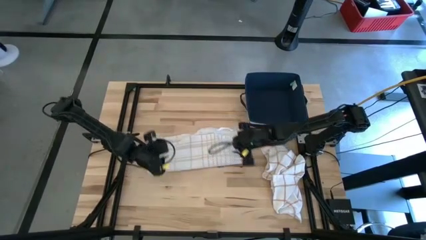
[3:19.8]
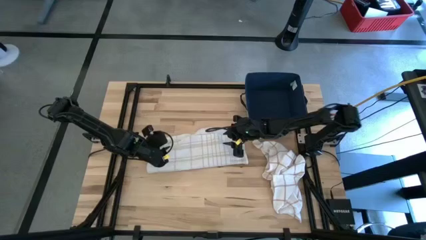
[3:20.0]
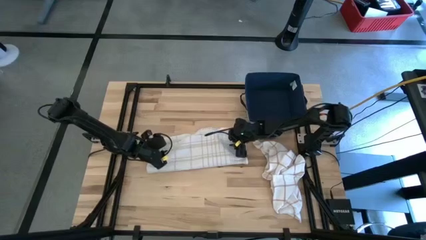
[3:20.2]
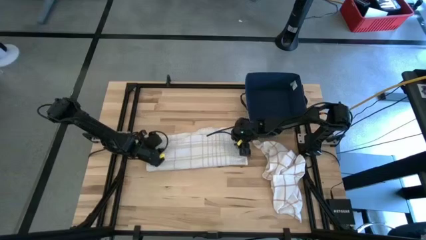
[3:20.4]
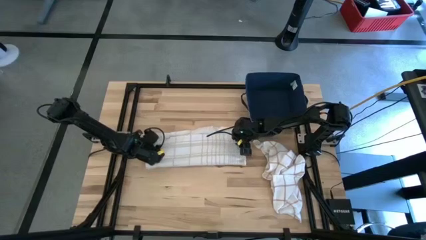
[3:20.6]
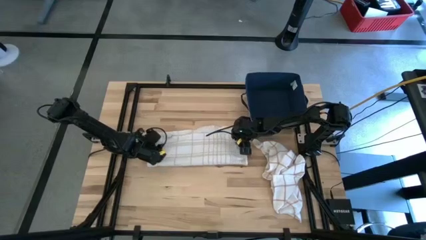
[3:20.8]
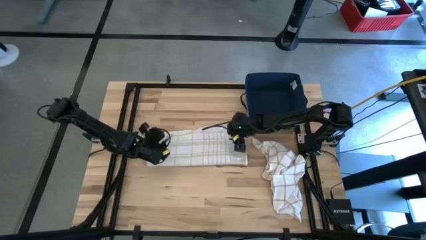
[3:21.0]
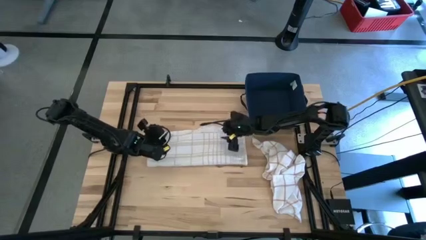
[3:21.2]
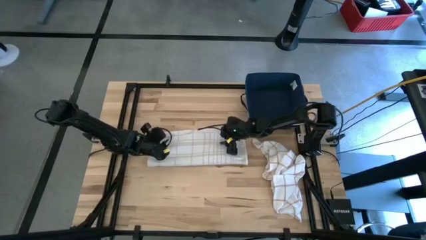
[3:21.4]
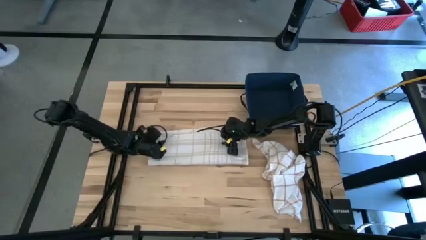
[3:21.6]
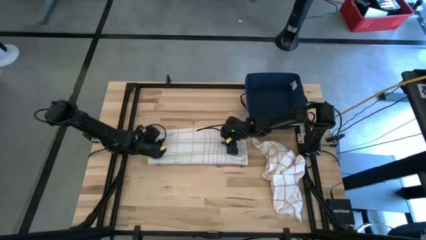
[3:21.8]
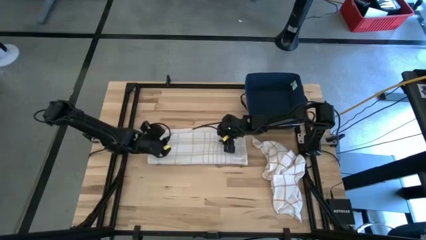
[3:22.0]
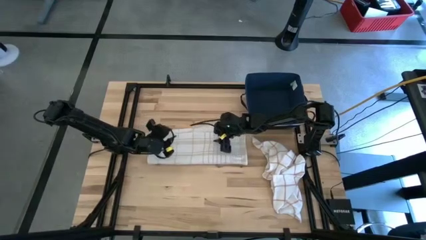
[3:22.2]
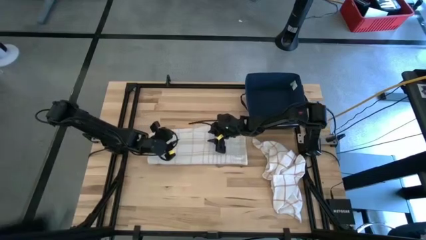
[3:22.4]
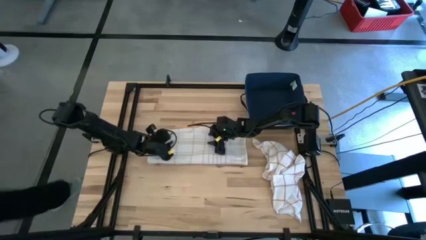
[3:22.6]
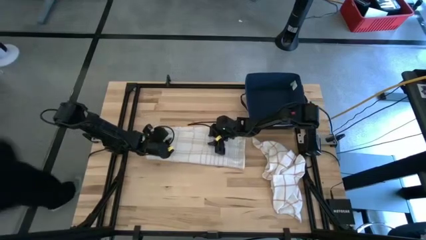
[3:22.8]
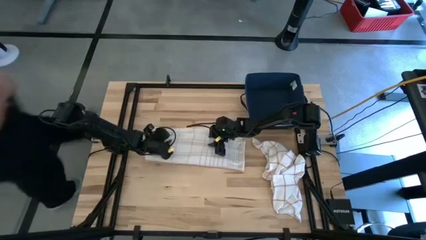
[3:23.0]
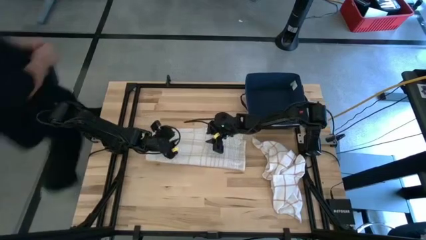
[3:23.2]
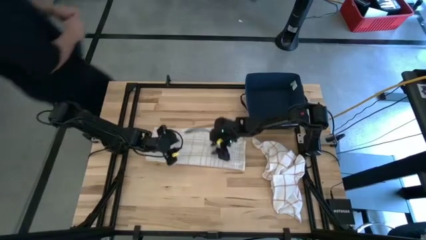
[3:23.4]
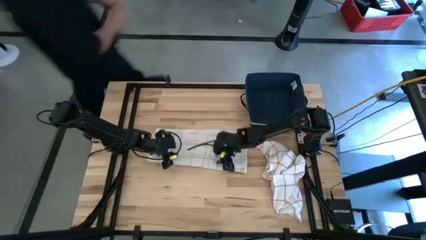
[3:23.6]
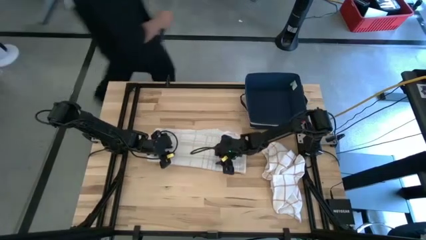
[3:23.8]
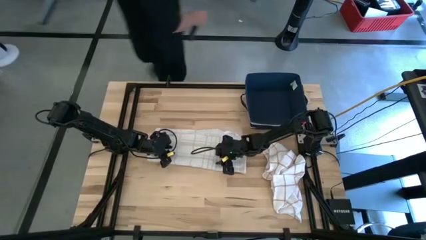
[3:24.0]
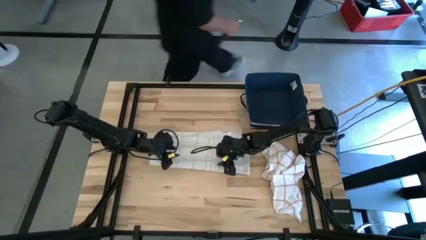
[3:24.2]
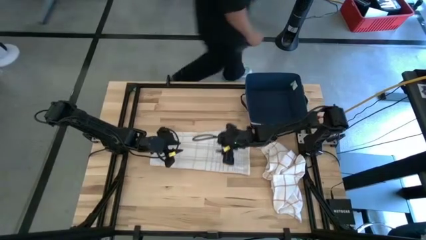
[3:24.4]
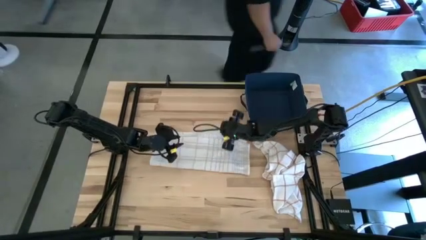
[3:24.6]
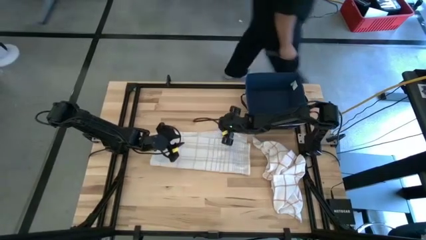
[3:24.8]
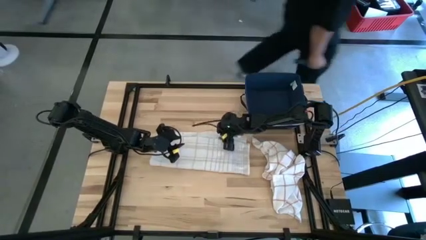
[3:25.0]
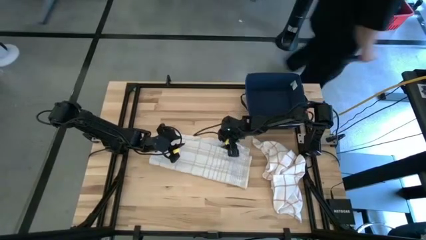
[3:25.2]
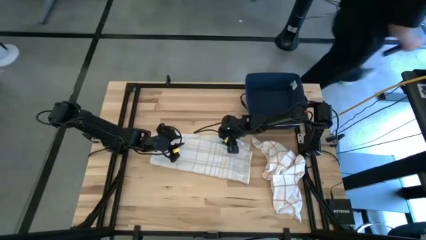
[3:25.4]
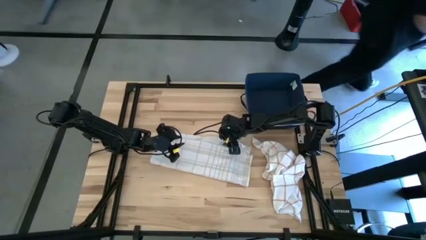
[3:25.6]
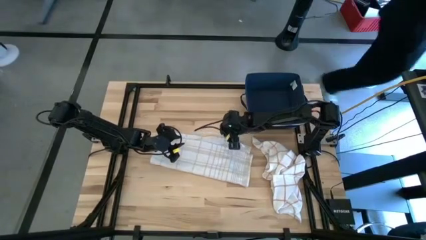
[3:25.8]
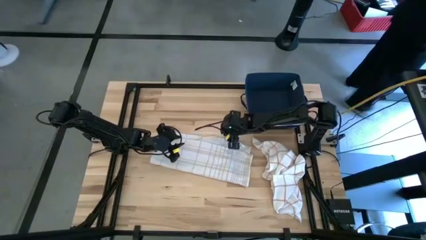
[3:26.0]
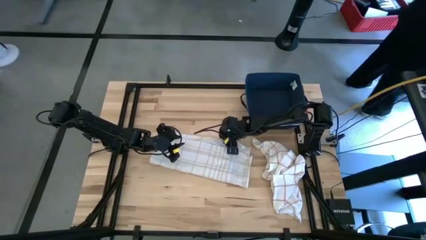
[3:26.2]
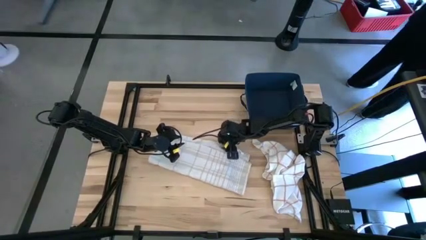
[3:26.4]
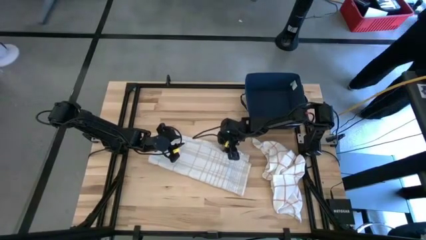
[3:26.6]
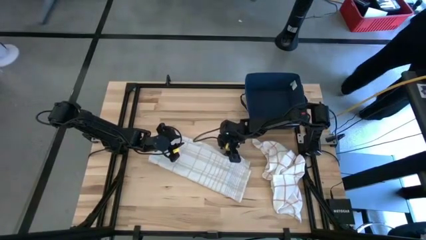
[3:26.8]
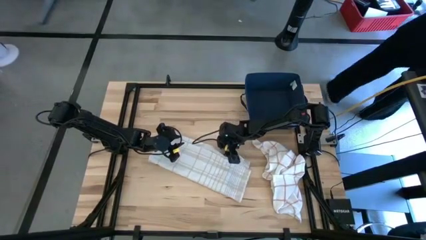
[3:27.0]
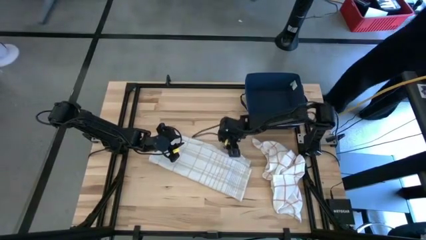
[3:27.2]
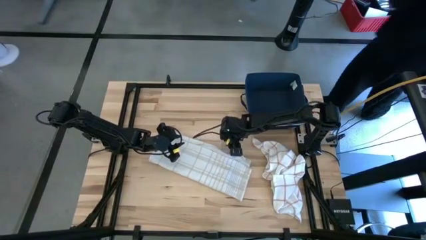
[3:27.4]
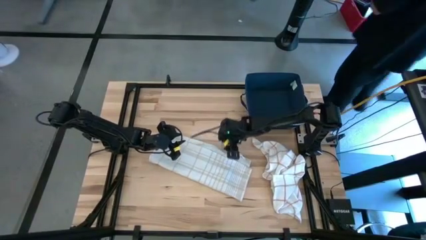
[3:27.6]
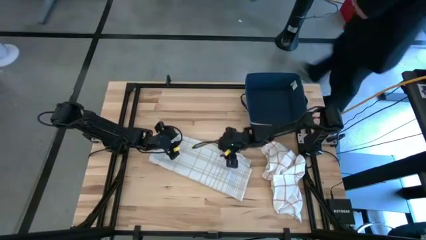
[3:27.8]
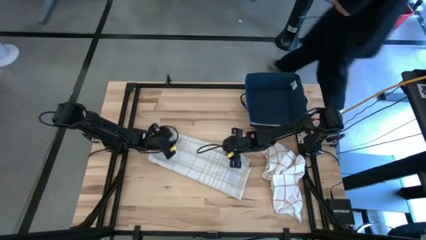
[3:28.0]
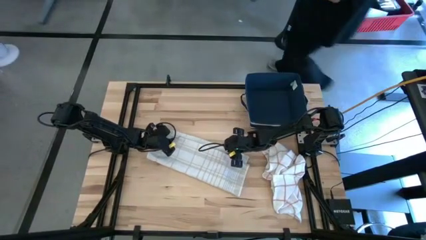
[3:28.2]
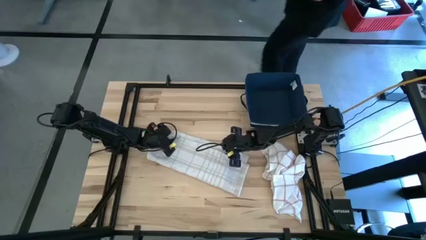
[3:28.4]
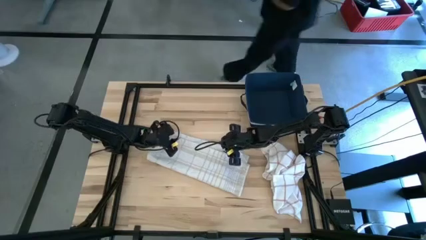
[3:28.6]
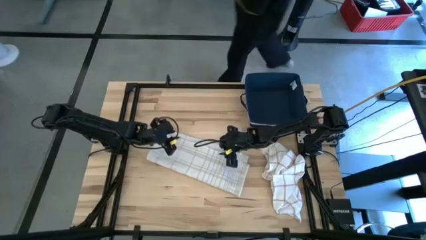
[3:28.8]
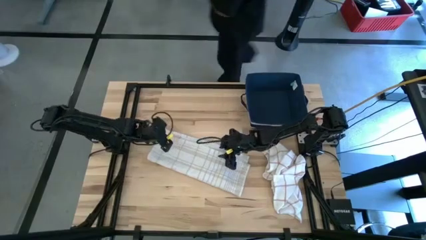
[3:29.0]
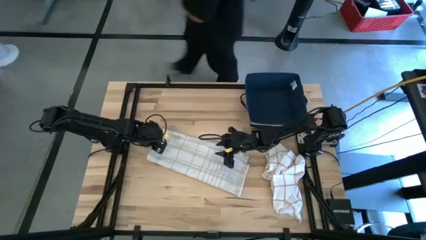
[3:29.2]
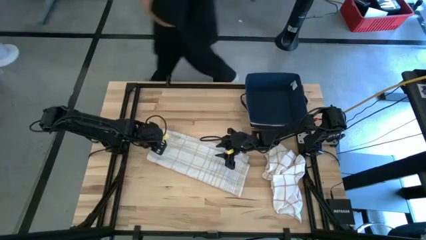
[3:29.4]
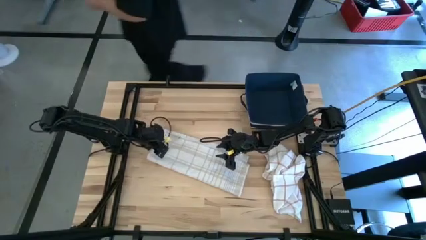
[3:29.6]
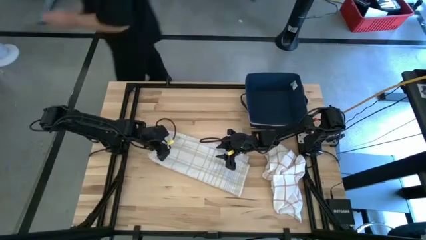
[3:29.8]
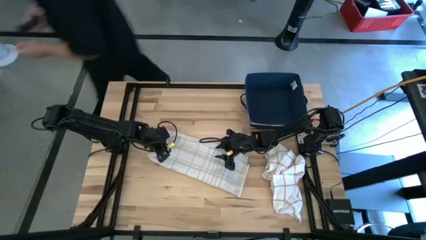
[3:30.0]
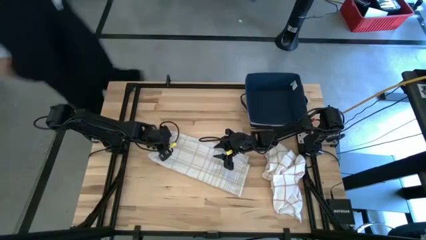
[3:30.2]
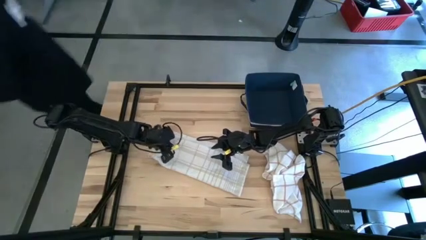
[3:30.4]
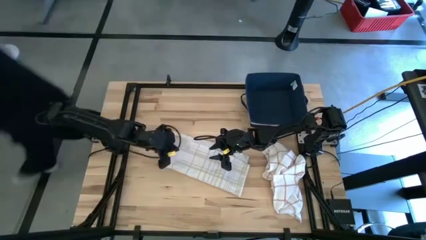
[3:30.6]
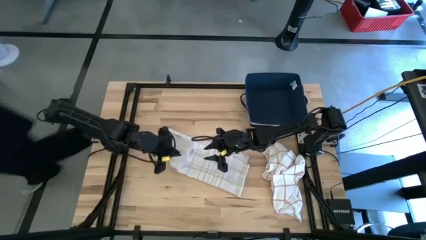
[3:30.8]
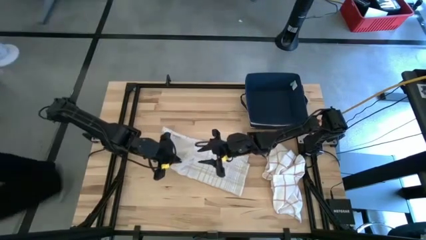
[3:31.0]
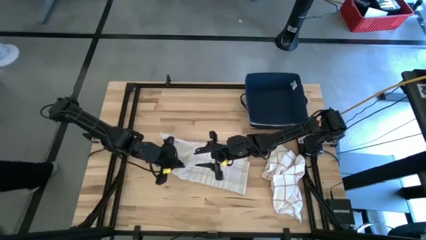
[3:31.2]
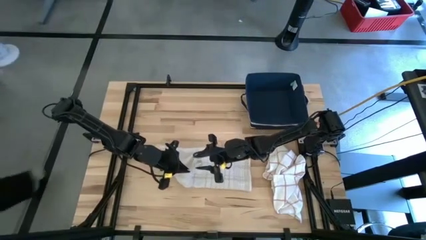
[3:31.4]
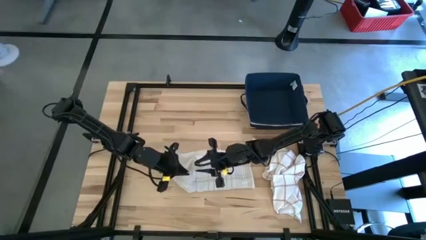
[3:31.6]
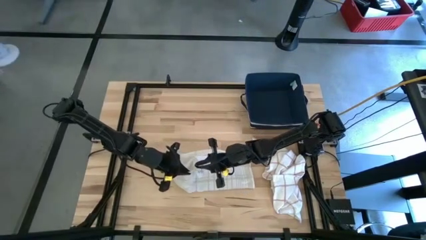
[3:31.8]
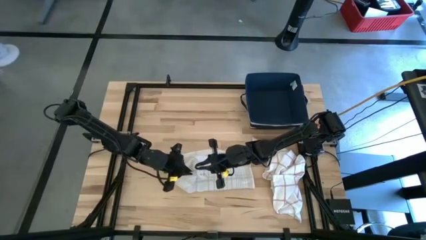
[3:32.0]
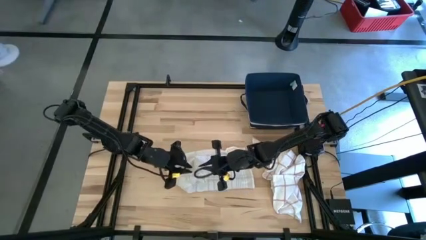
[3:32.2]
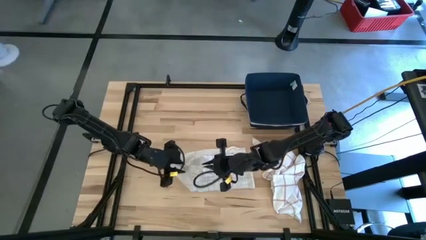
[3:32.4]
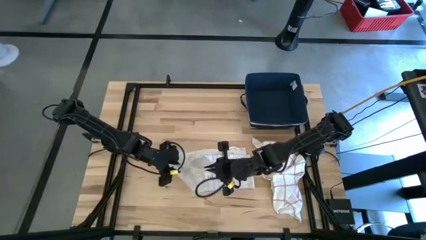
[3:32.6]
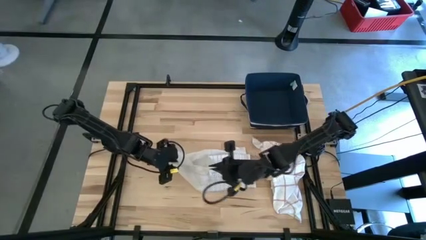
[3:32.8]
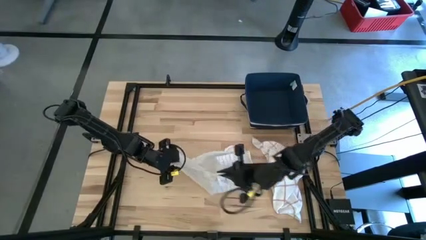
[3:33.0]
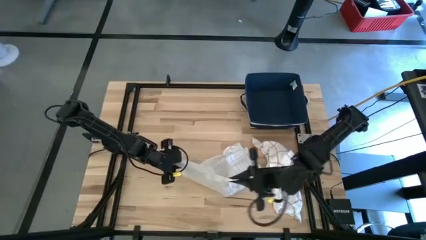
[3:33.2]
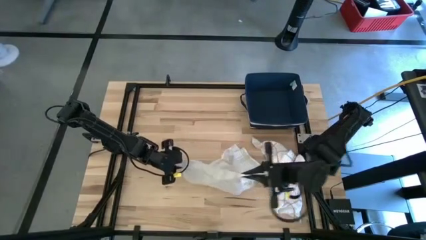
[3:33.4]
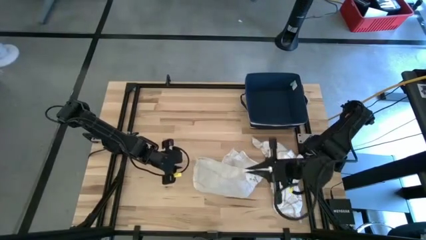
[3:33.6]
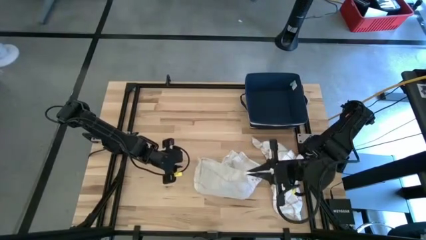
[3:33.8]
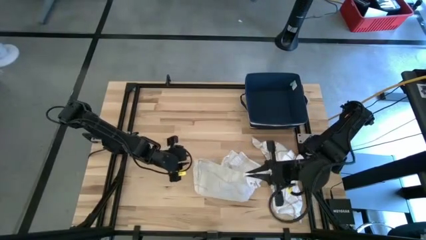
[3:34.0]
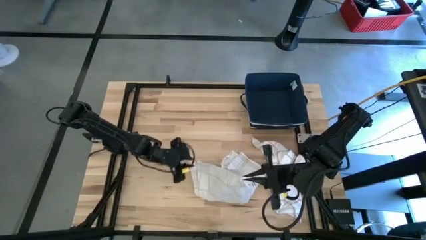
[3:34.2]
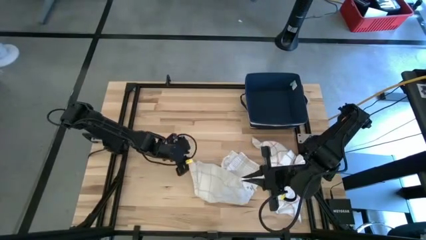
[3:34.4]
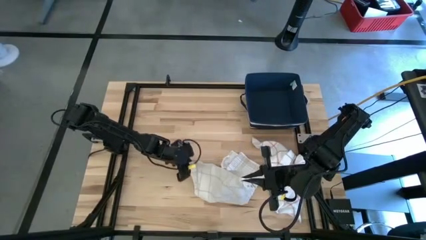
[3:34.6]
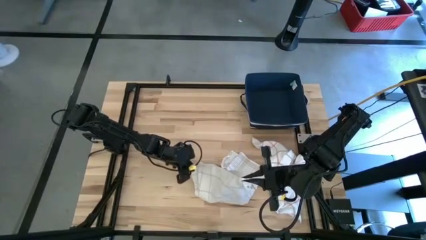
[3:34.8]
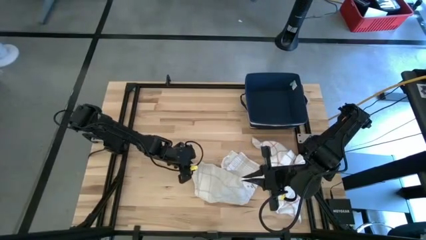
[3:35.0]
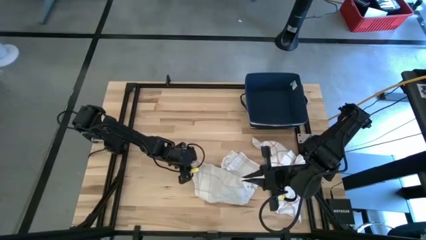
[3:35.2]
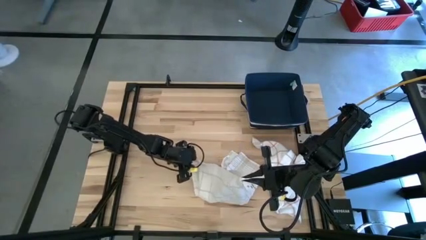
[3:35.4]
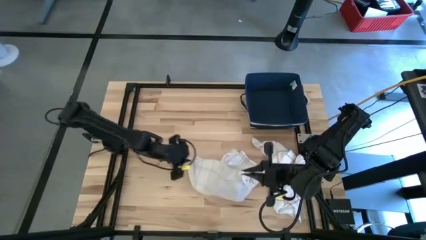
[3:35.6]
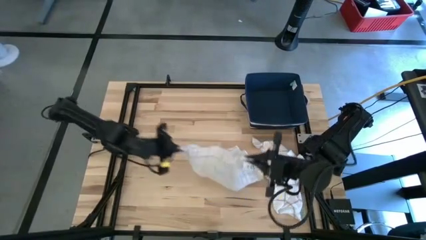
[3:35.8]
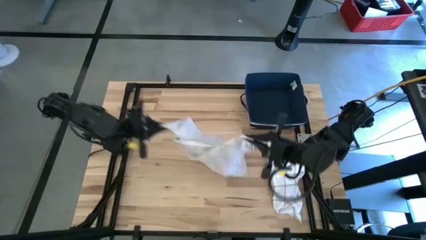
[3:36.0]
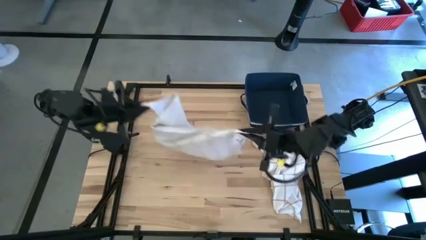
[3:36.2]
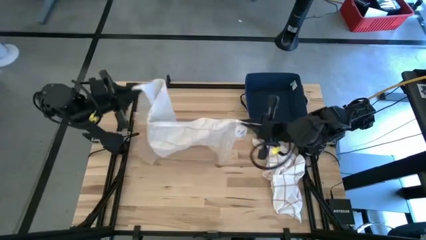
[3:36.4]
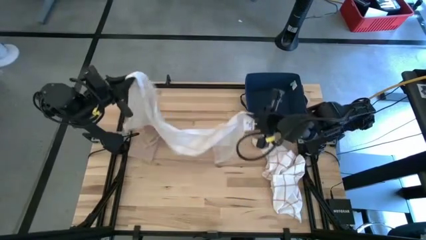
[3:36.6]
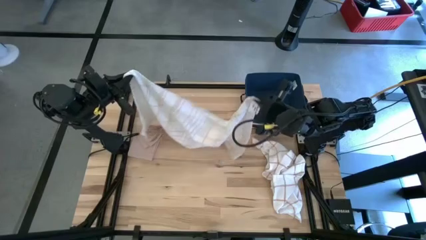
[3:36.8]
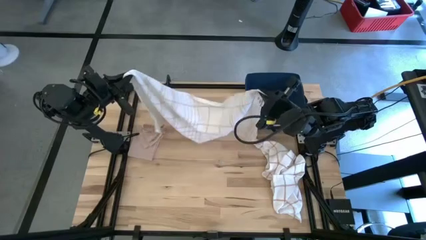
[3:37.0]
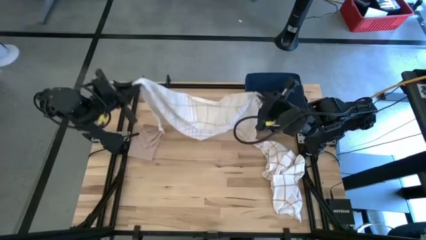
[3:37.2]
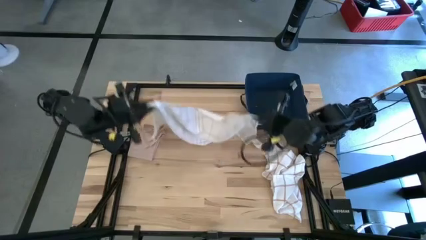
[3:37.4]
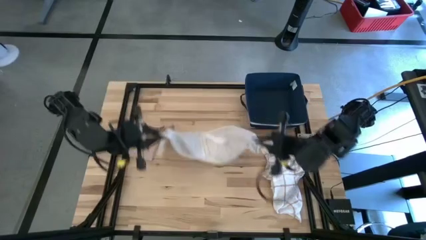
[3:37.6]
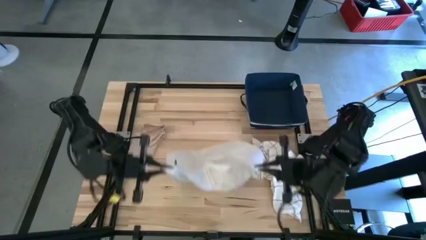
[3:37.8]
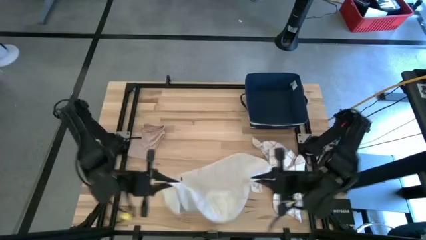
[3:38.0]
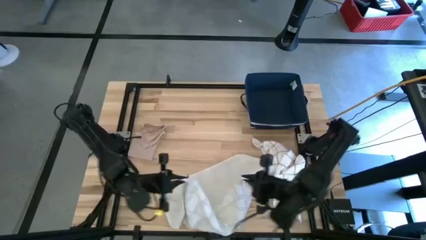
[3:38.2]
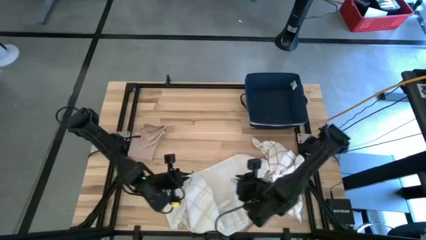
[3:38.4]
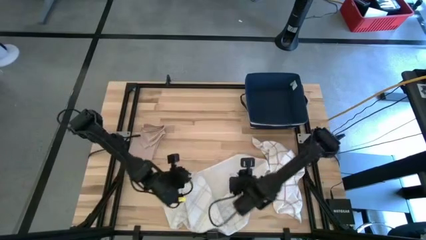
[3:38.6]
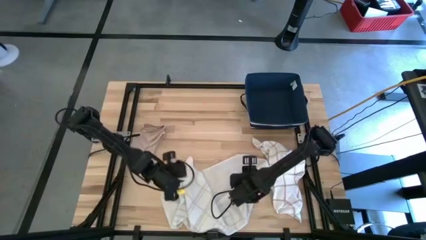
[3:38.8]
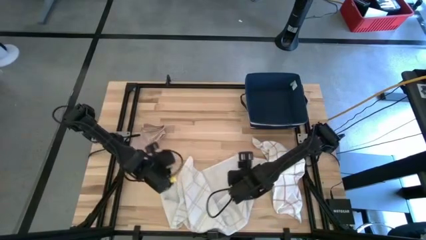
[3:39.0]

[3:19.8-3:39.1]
Task: Fold towel
Fold the white patterned towel
